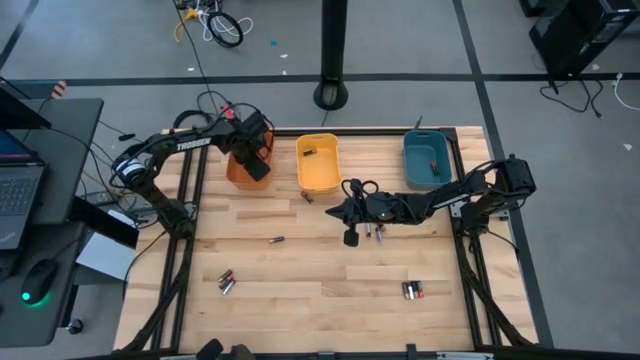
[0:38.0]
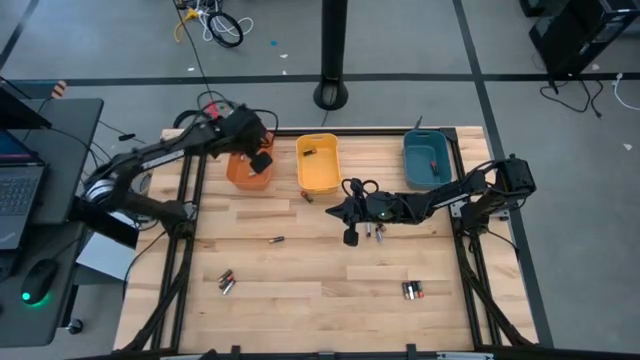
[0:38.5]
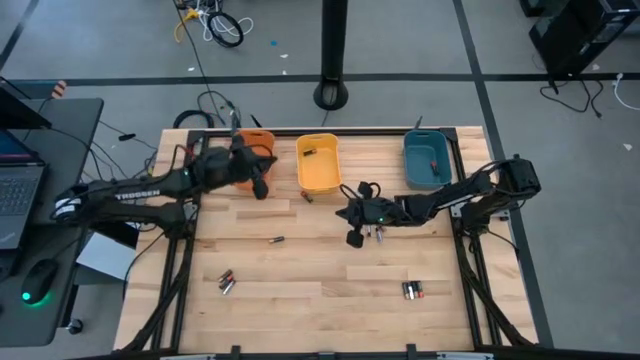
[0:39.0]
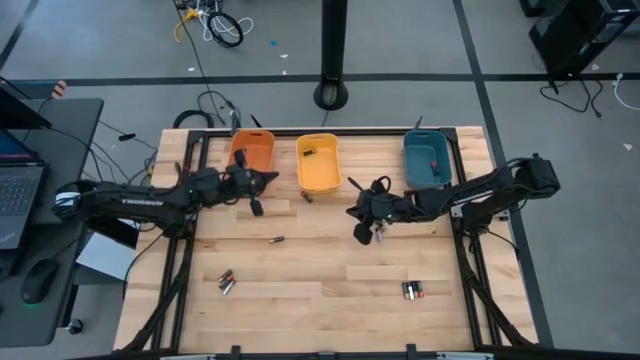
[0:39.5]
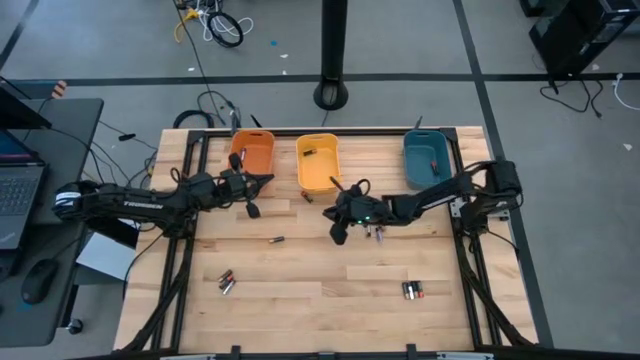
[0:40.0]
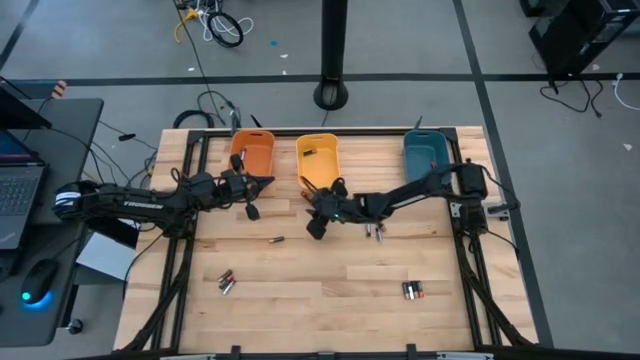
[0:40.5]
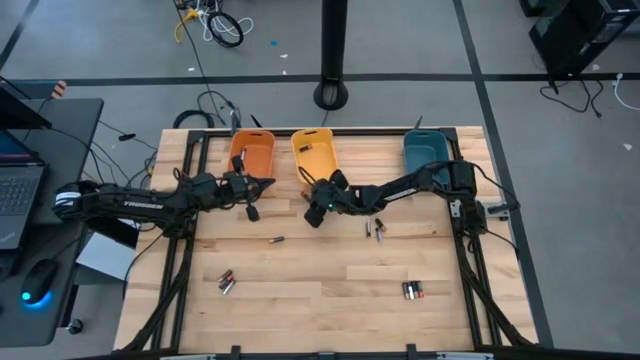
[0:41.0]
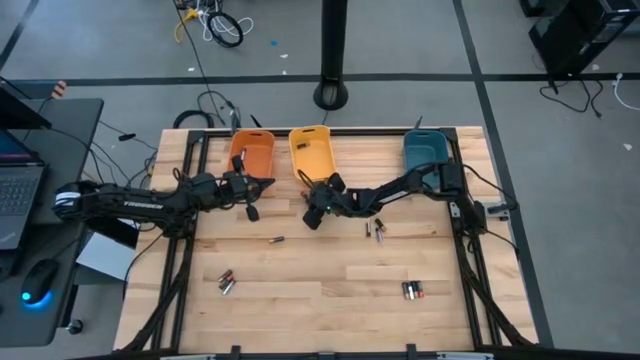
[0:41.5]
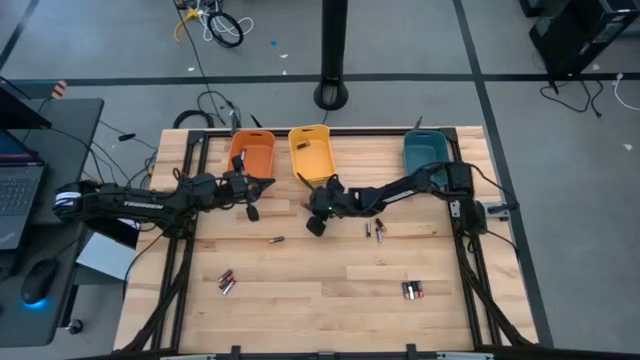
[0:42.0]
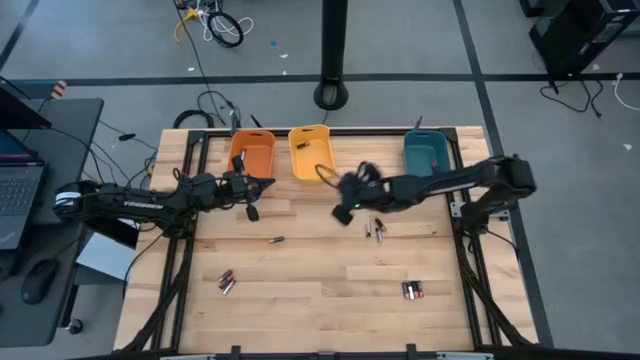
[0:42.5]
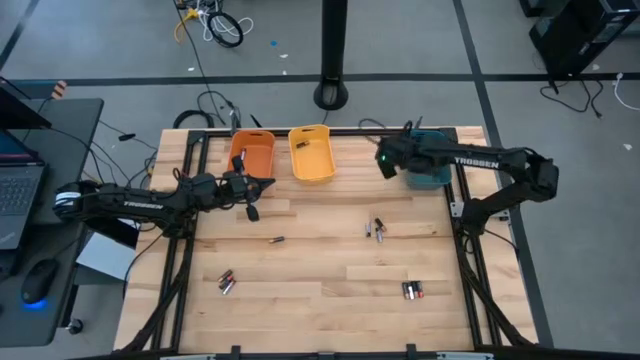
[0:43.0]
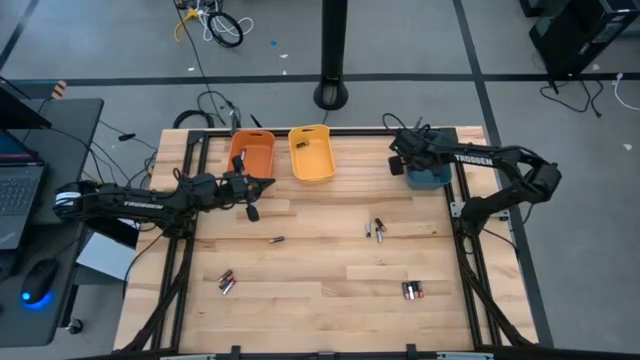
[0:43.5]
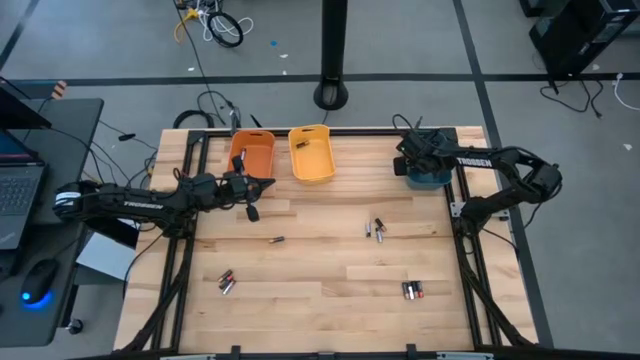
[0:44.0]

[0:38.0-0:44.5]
Task: Sort batteries
Put the orange battery into the blue bin

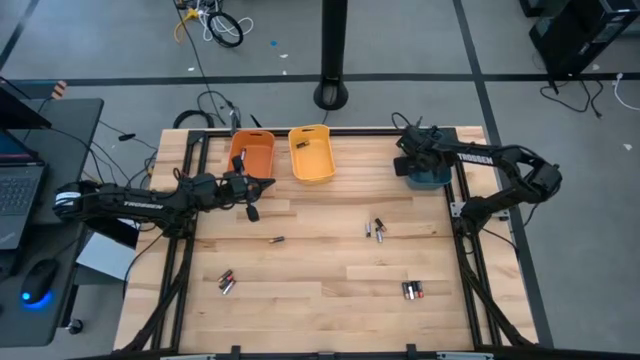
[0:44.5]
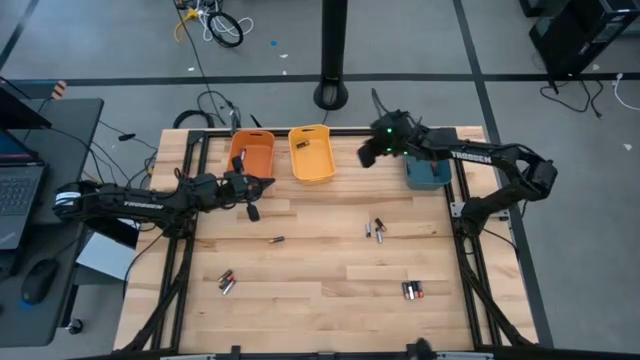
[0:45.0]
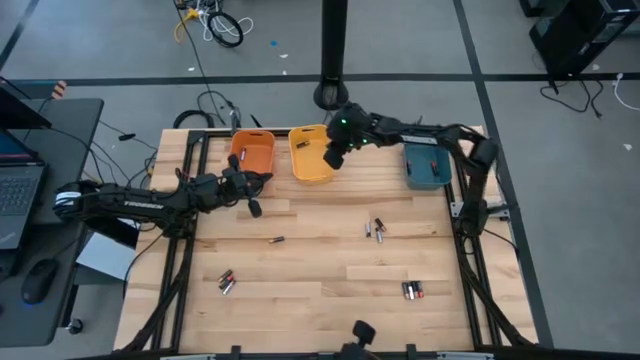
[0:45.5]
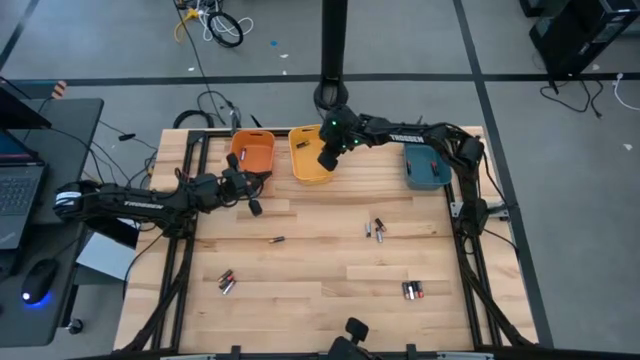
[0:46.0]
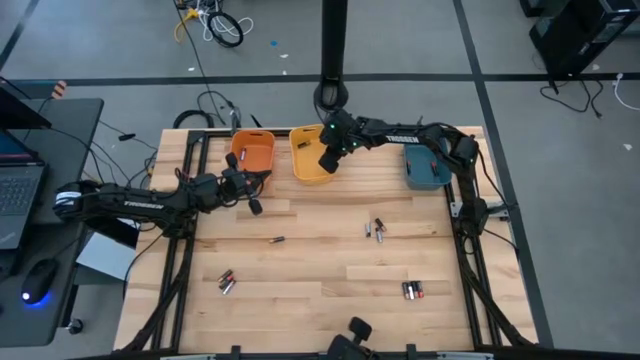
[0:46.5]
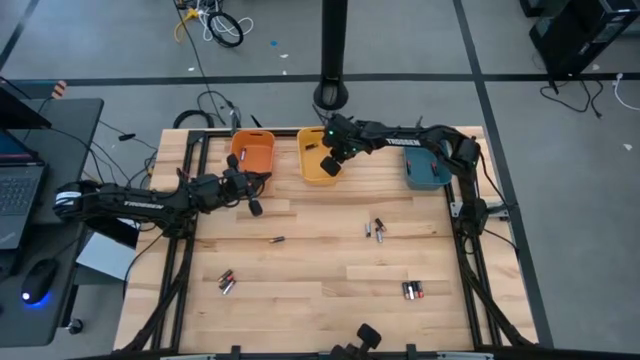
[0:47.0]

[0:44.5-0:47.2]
Adjust the yellow bin

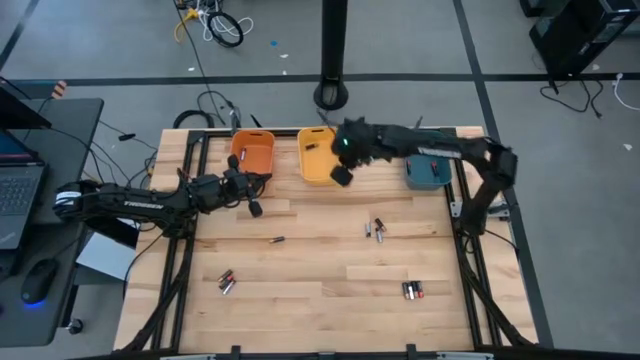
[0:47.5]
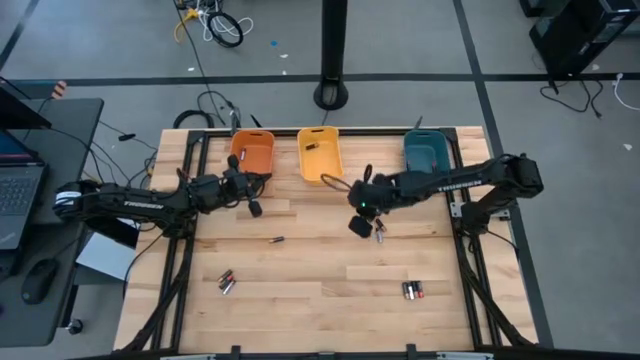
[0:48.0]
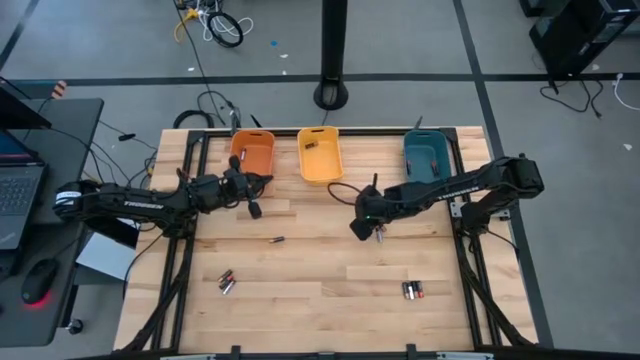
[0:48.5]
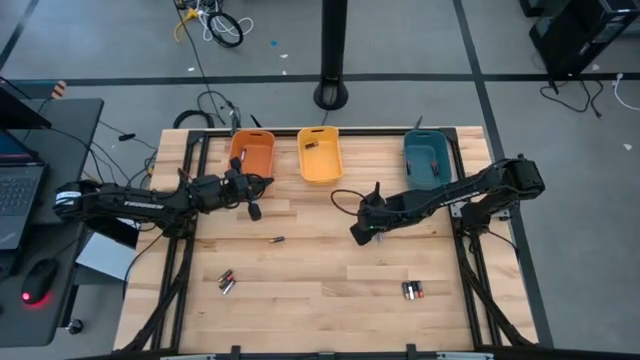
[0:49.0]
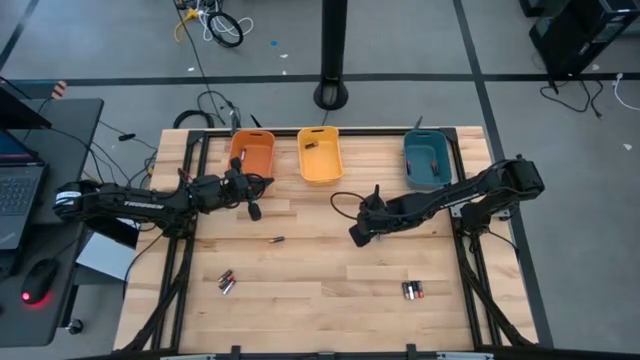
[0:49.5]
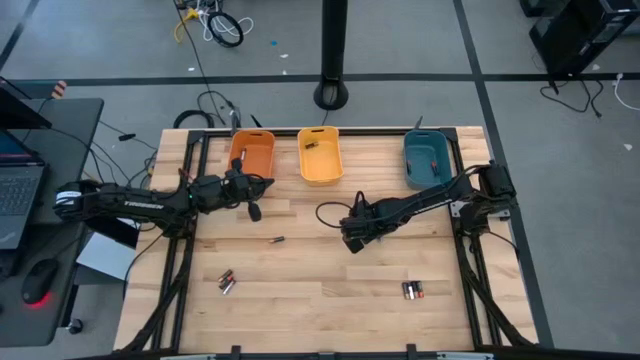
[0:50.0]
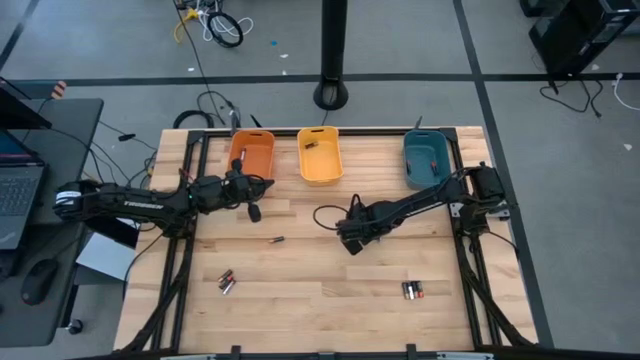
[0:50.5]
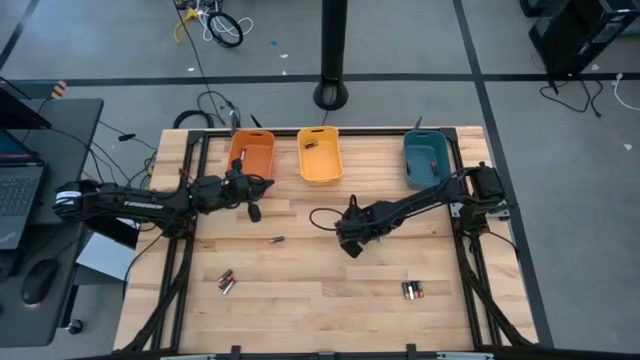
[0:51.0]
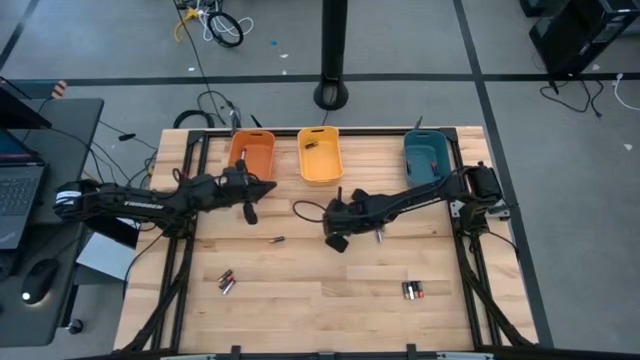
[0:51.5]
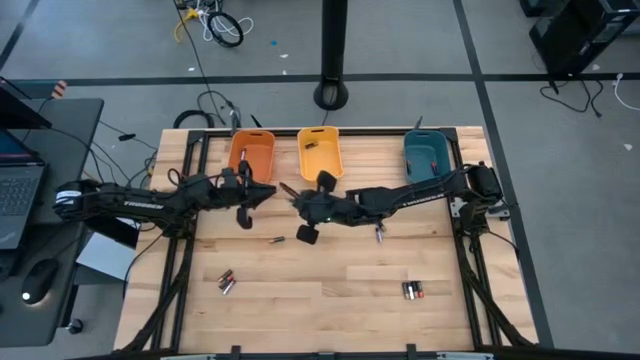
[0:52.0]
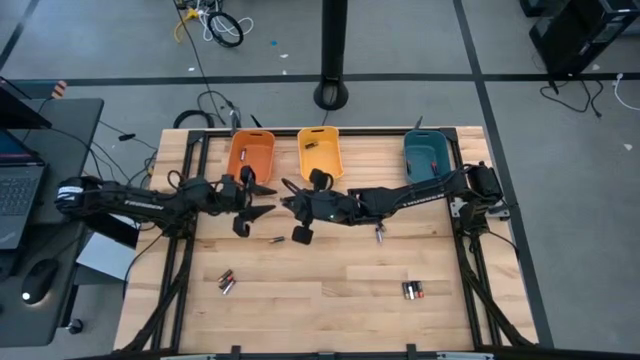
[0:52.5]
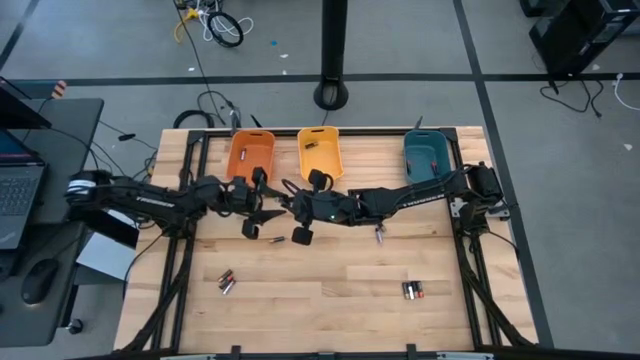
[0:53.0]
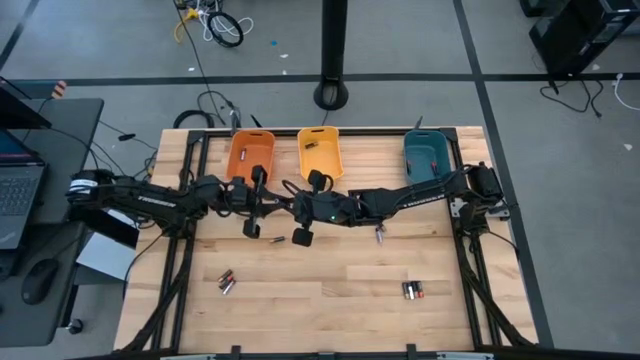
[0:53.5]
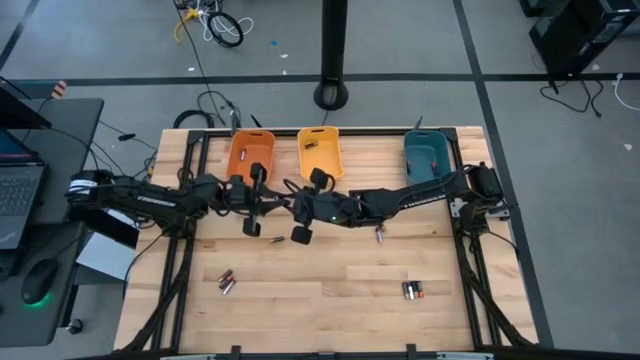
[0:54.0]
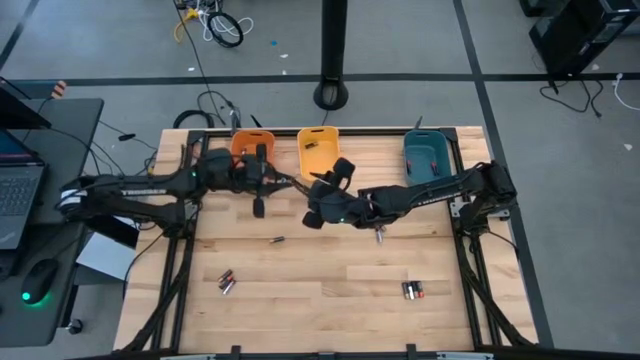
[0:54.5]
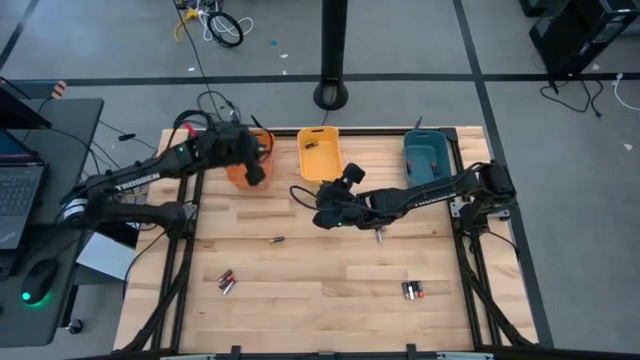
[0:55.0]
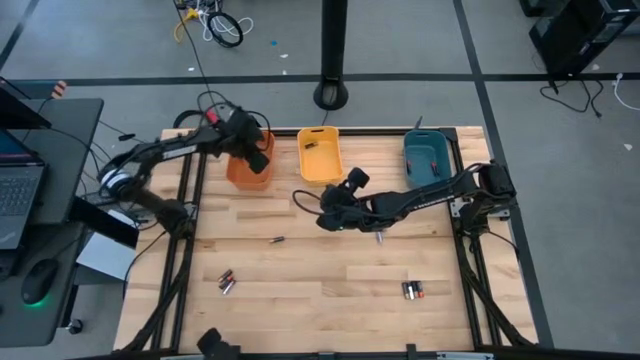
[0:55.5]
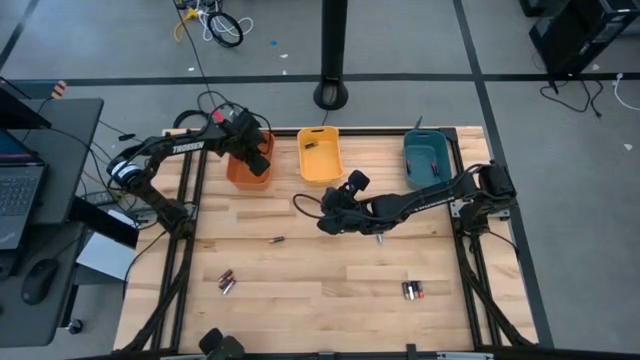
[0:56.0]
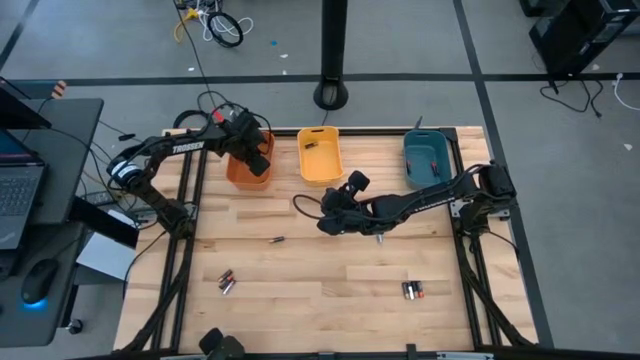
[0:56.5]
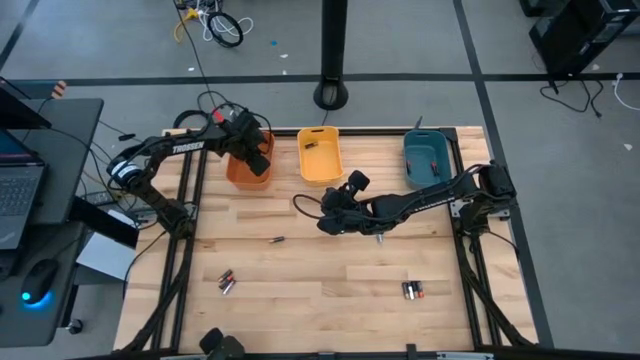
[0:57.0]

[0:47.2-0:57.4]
Put the silver battery into the orange bin

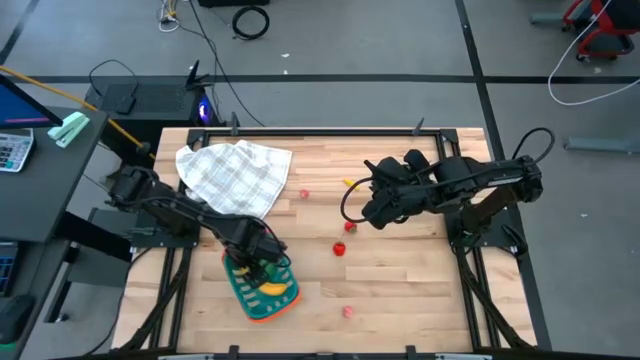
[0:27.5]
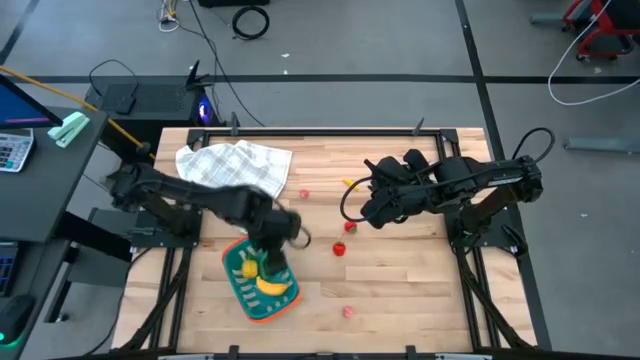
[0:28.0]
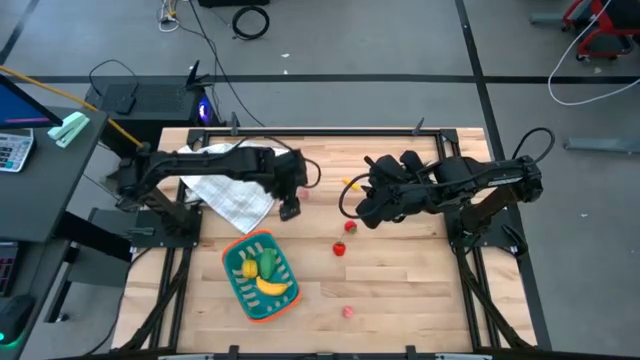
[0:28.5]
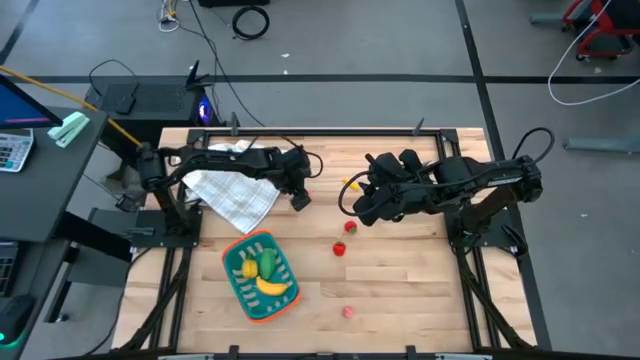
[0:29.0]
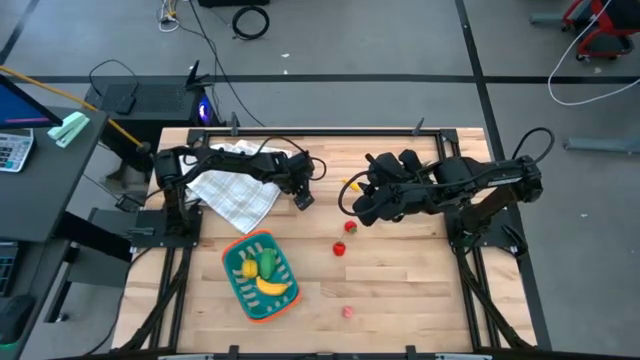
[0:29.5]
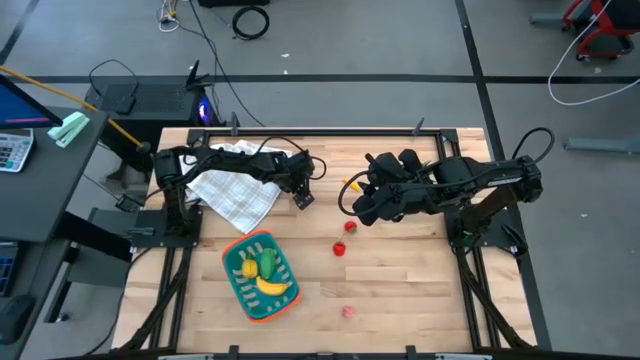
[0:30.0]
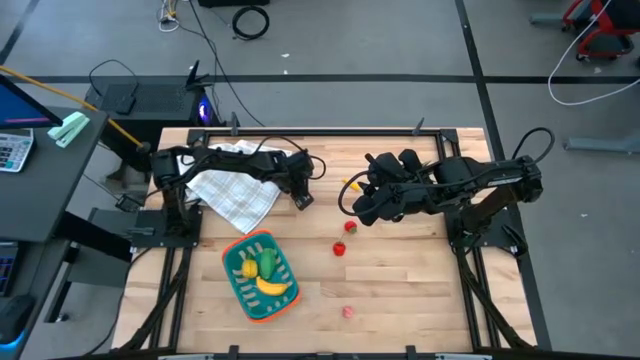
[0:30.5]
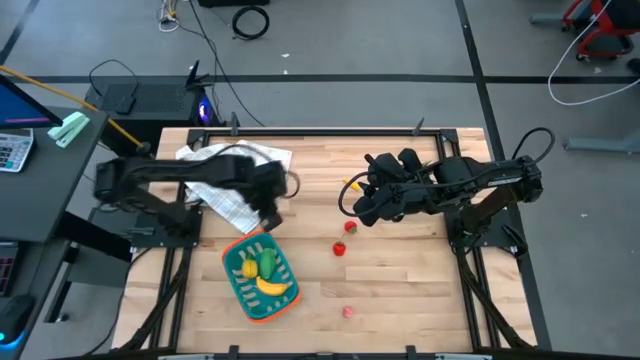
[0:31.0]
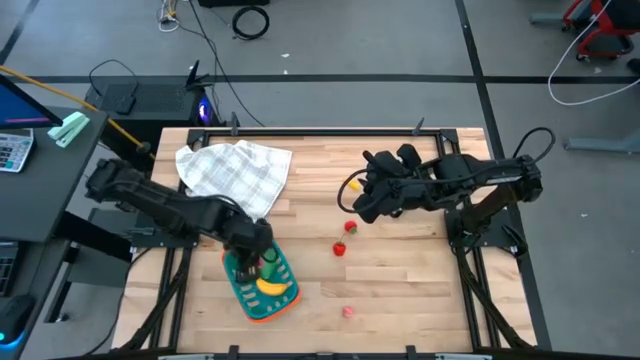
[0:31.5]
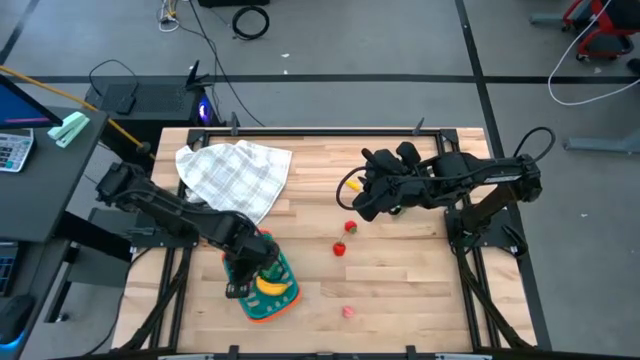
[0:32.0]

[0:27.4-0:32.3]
Task: Pick and placing Produce into tupperware
Put the top pink peach into the blue basket
